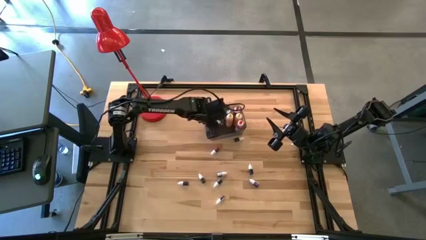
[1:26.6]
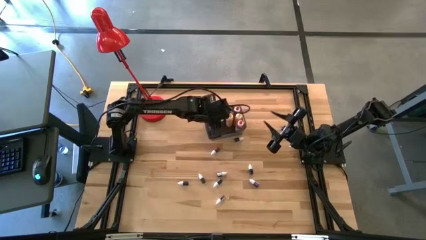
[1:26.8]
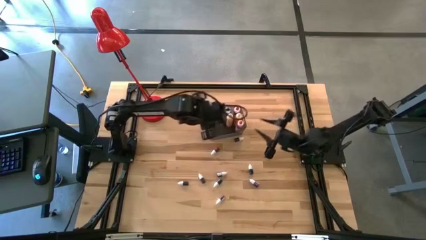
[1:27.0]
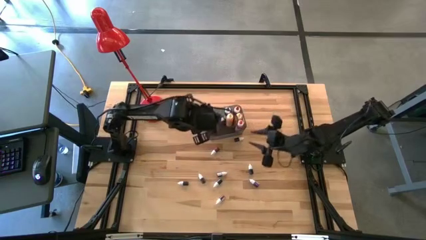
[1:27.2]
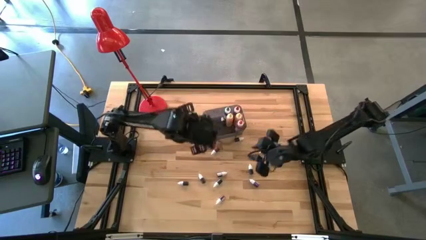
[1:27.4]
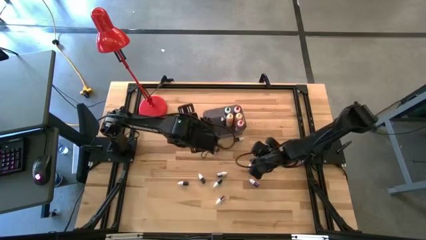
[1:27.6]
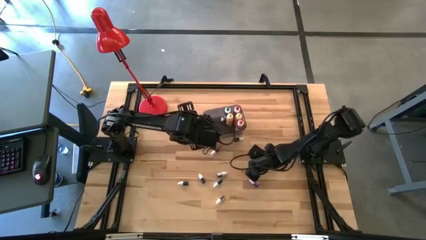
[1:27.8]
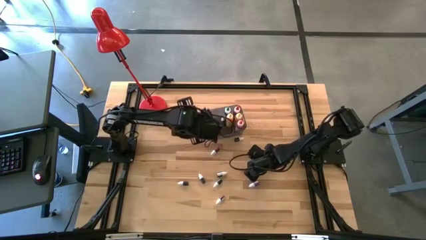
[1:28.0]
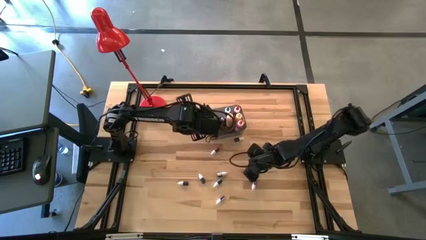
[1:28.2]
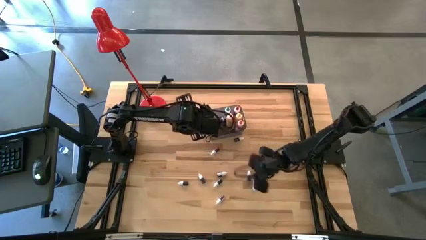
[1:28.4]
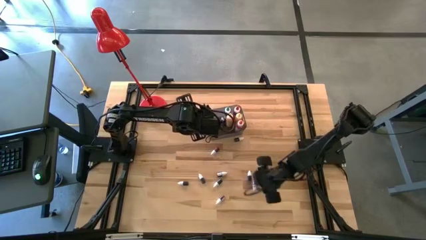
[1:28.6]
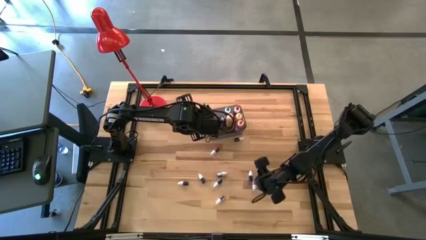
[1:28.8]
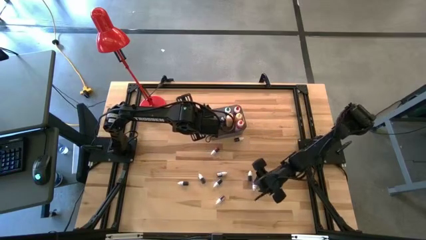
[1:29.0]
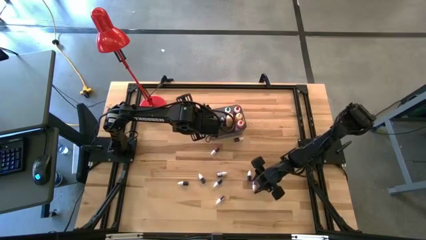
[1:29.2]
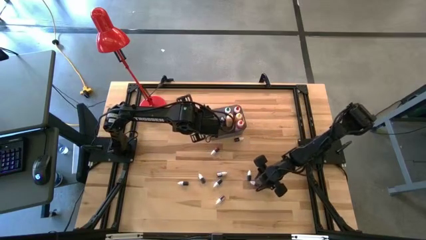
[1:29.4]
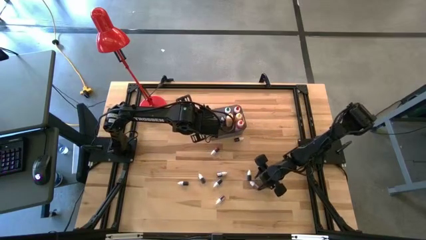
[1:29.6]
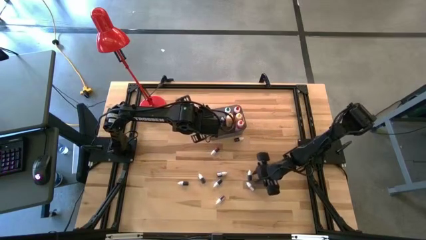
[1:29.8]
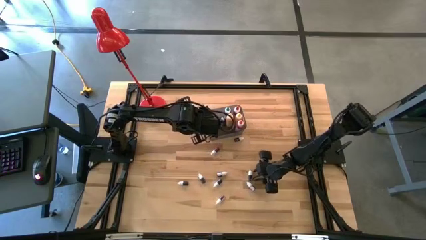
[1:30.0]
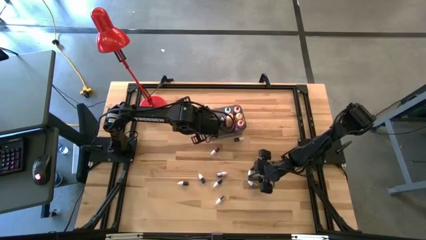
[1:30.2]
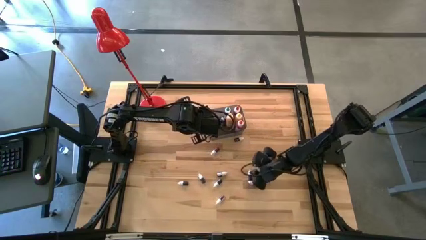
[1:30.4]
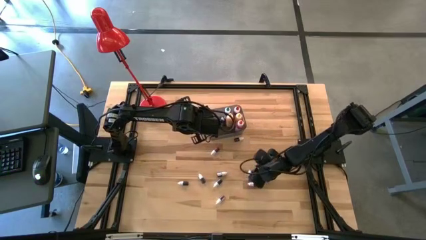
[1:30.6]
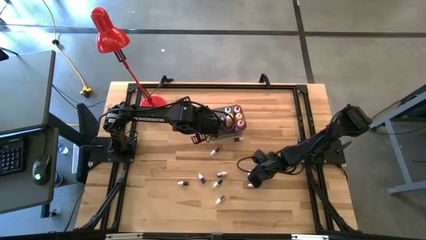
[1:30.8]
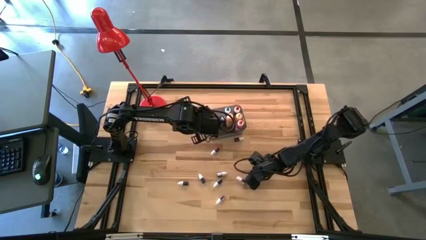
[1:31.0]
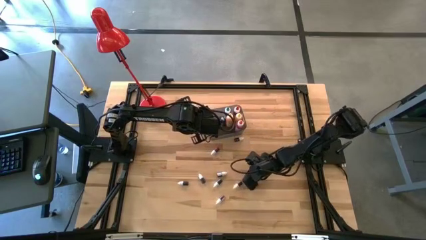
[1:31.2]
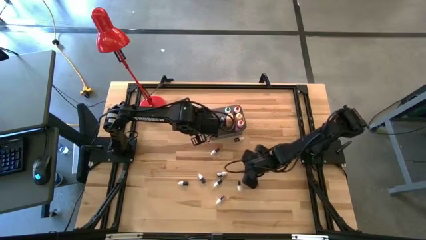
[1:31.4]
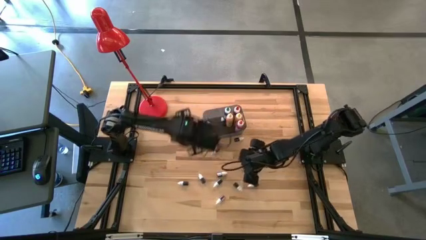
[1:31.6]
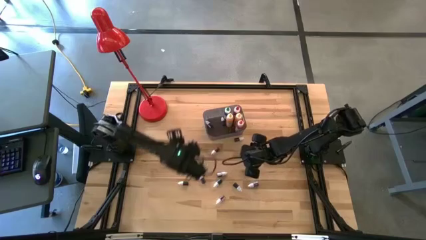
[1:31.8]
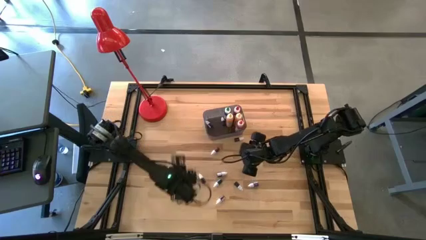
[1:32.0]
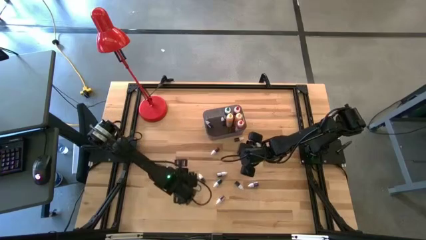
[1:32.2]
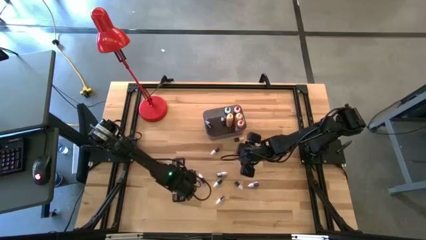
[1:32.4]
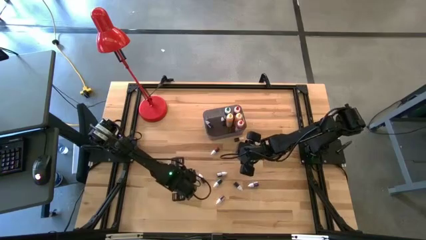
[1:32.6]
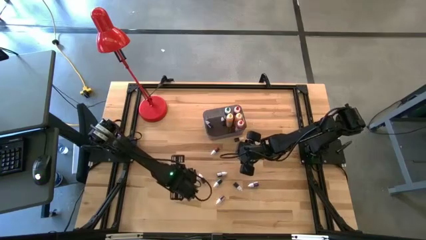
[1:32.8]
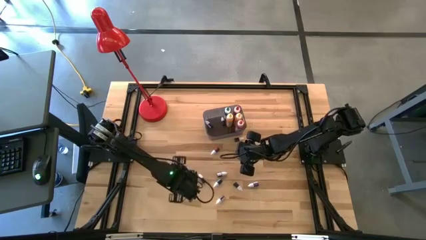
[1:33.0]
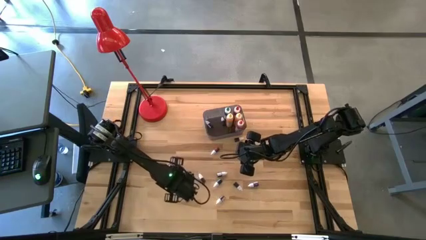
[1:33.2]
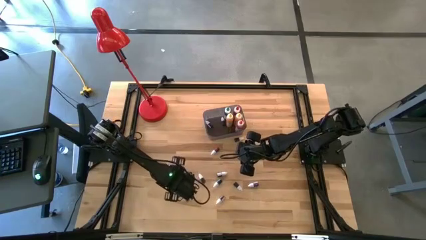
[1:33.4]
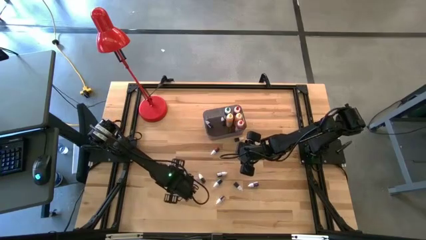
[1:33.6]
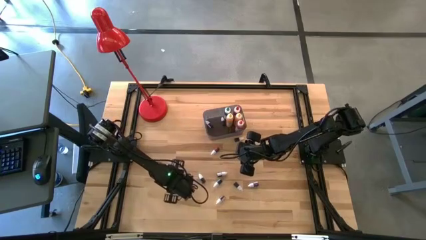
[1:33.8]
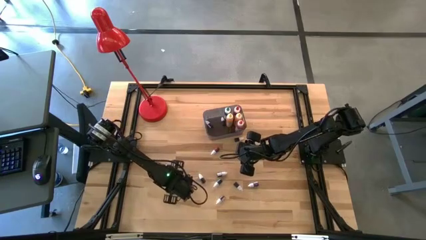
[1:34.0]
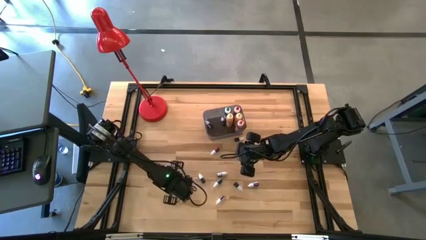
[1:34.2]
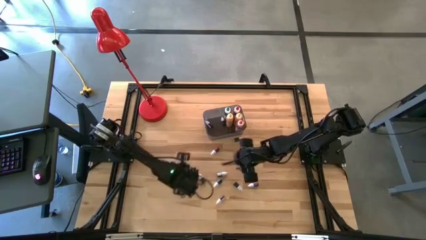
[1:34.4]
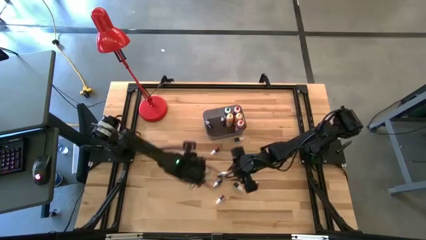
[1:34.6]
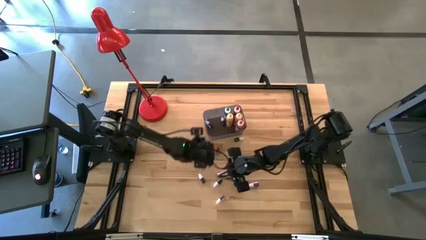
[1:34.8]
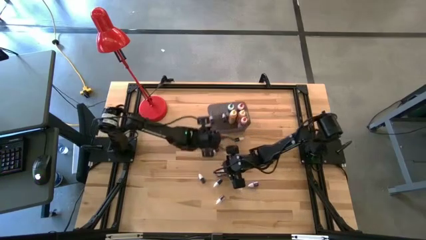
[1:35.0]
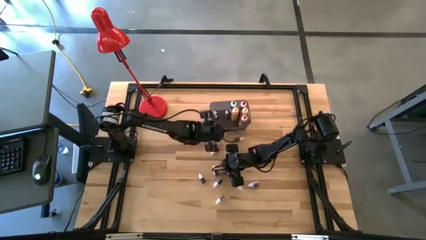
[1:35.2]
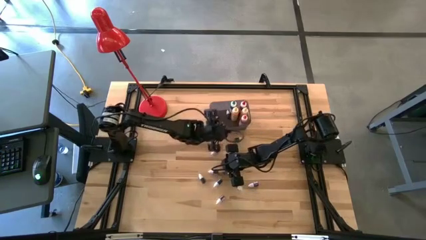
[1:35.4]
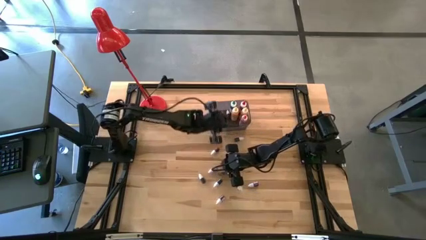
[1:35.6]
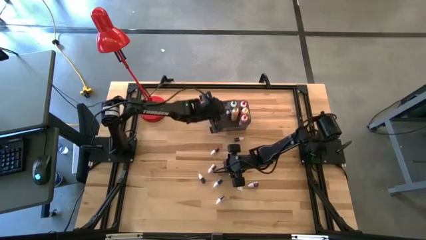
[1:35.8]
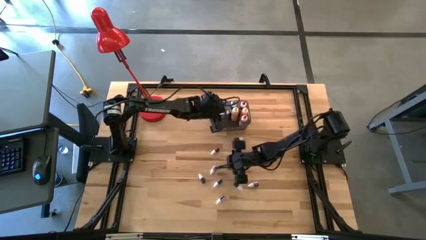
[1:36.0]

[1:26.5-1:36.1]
Task: Pick & Place food coloring
Put the small black food coloring bottle into the black bin

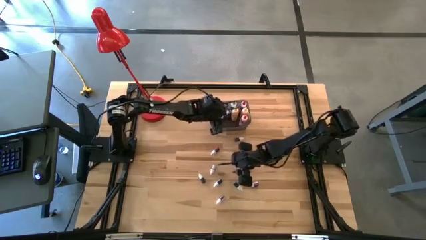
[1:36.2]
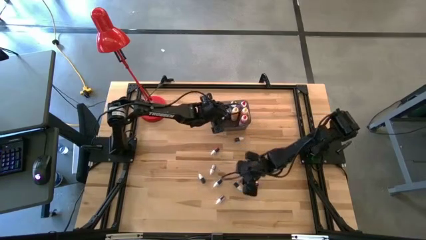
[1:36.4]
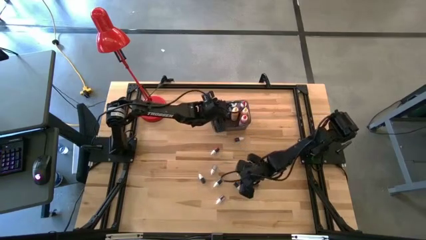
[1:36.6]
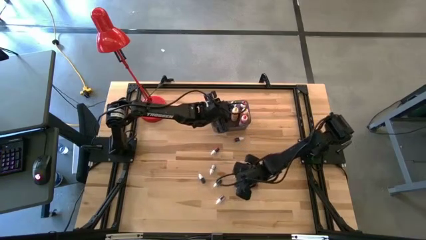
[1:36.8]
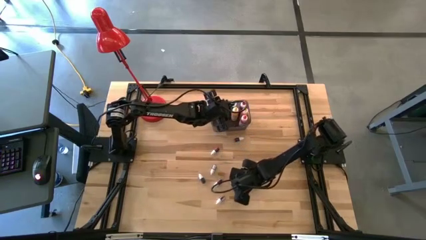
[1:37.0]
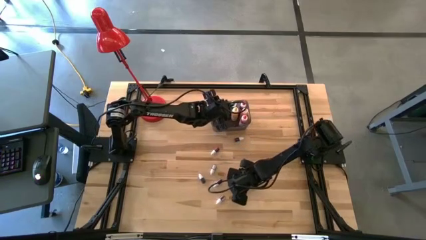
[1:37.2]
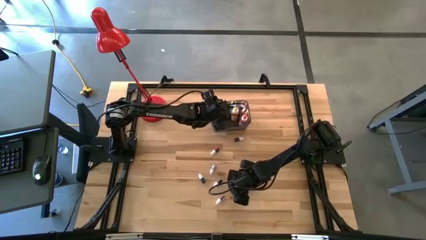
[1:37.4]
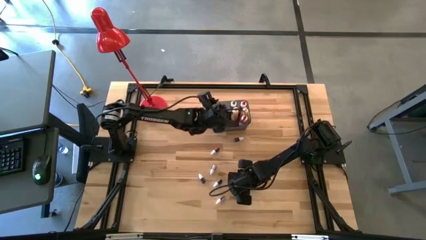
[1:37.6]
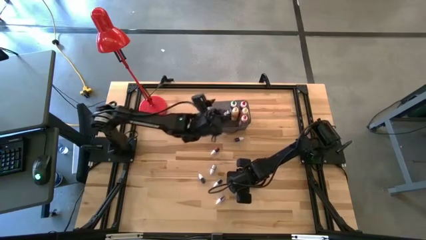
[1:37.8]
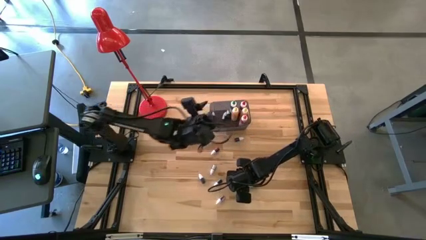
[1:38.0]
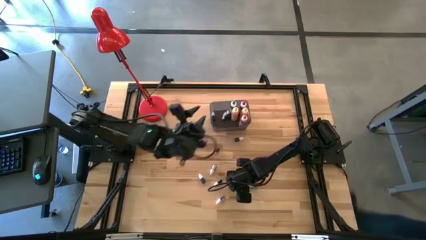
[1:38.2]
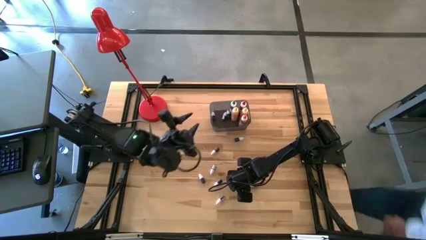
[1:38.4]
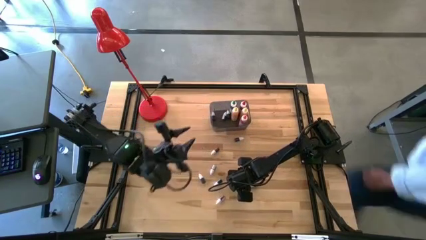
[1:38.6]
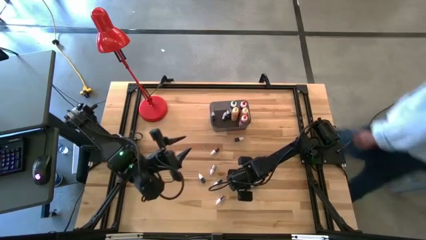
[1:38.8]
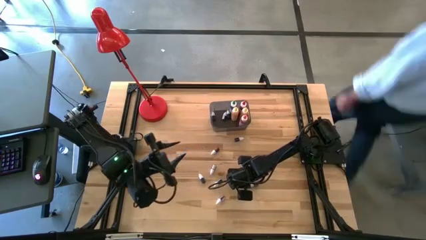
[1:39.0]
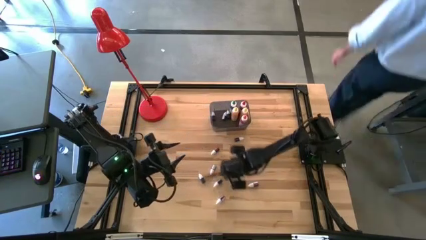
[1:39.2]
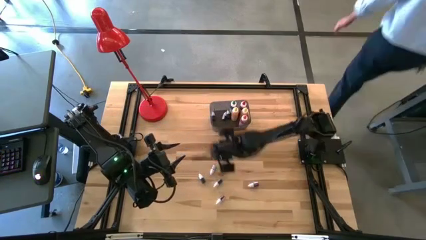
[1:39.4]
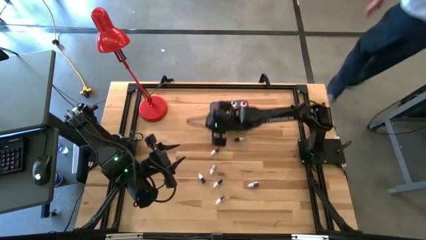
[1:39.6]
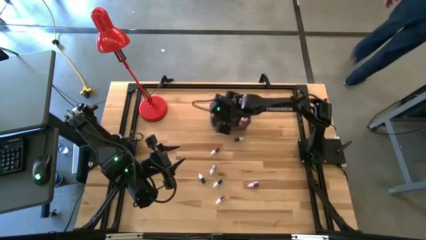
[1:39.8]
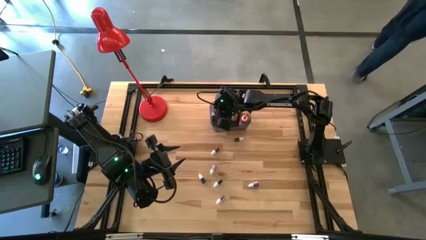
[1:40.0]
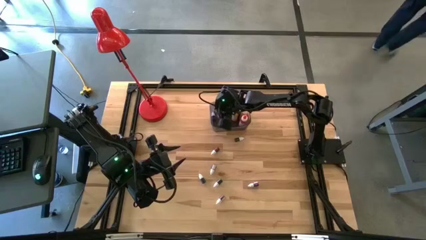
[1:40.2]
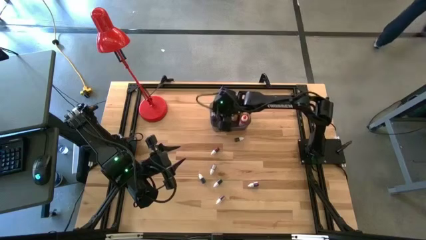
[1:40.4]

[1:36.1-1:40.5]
Put the small green food coloring bottle into the black bin

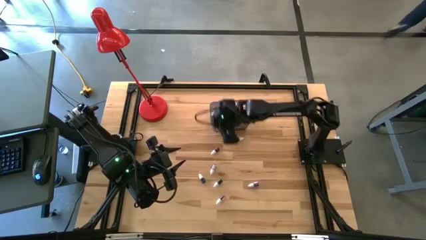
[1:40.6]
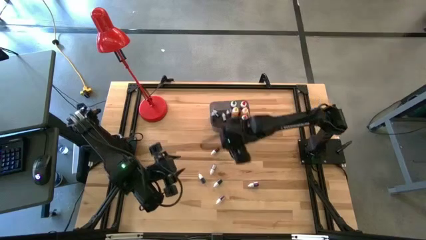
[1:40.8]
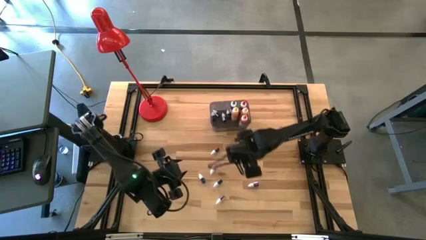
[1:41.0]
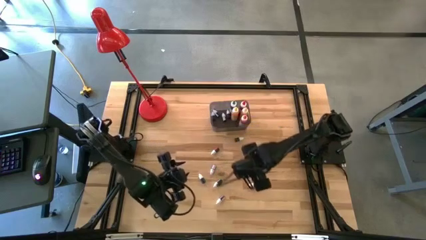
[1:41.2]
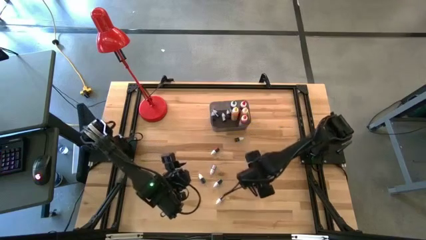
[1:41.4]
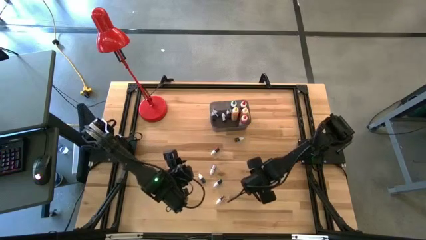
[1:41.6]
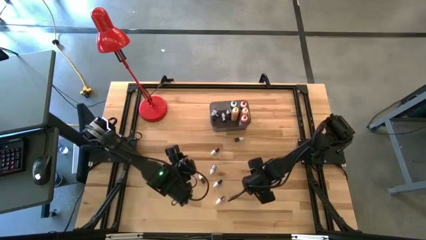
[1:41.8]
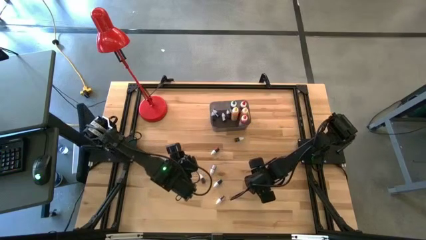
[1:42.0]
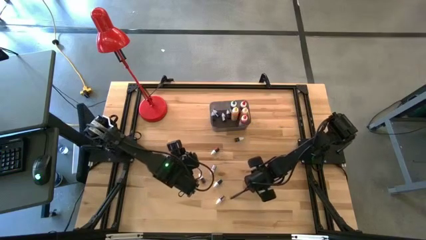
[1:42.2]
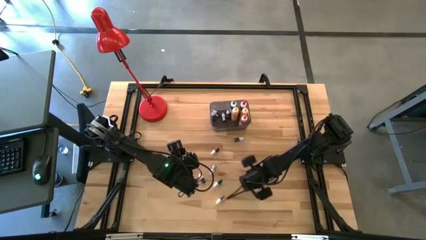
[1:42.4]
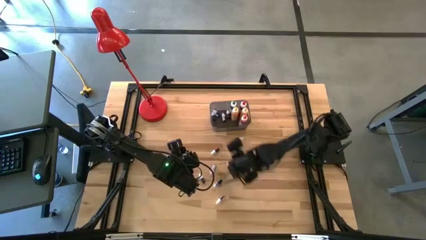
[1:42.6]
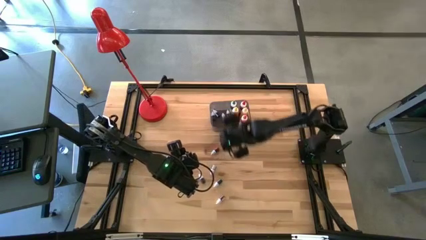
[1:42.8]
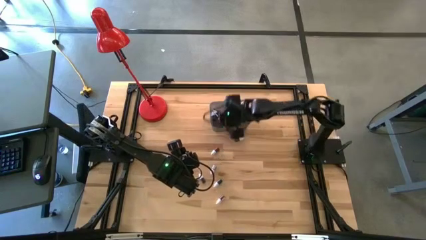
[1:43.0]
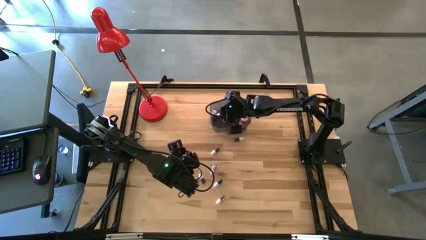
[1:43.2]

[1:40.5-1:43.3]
Put the small purple food coloring bottle into the black bin
